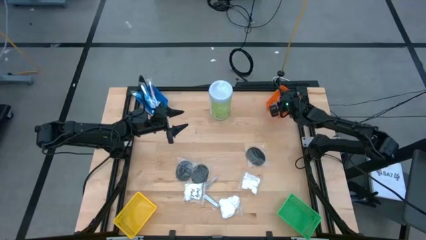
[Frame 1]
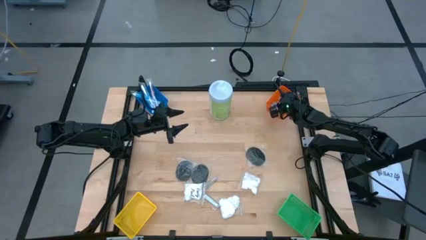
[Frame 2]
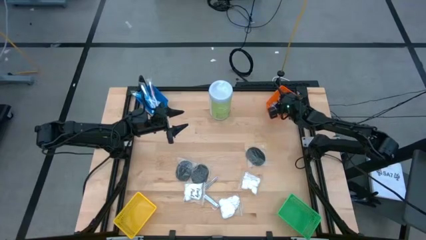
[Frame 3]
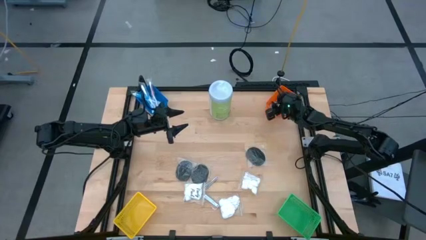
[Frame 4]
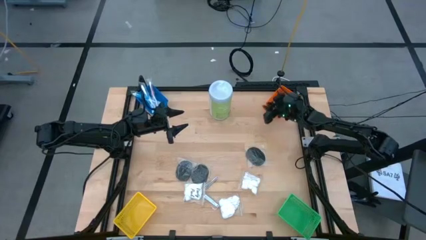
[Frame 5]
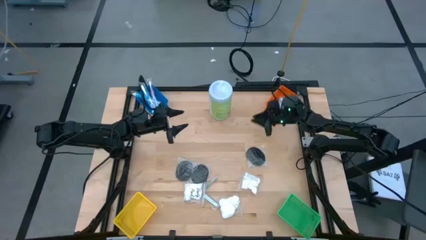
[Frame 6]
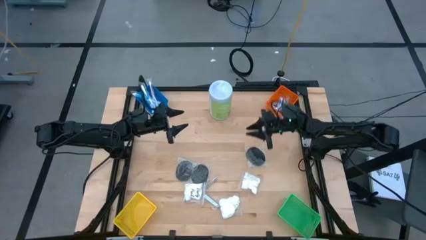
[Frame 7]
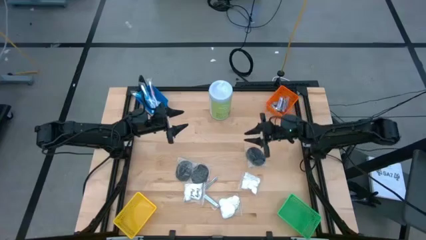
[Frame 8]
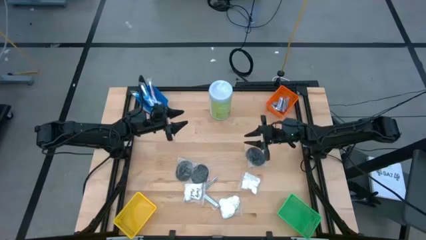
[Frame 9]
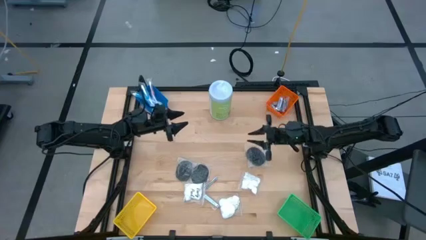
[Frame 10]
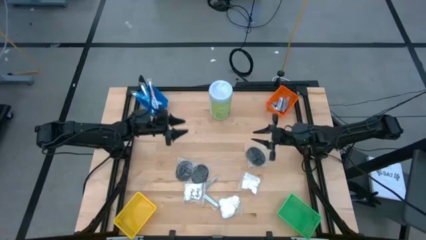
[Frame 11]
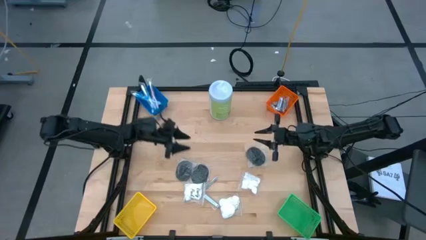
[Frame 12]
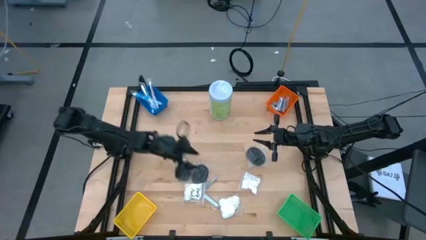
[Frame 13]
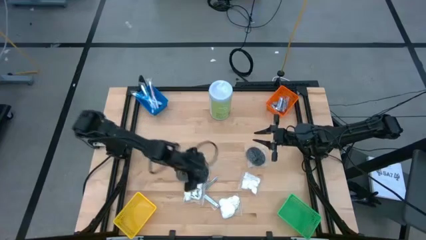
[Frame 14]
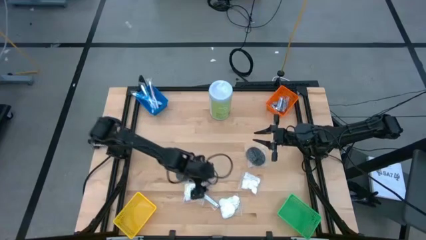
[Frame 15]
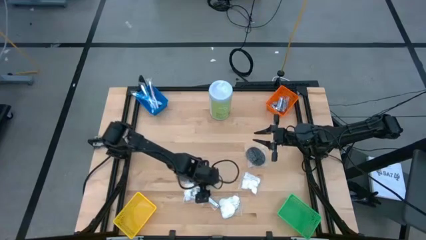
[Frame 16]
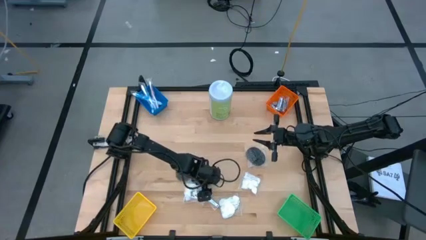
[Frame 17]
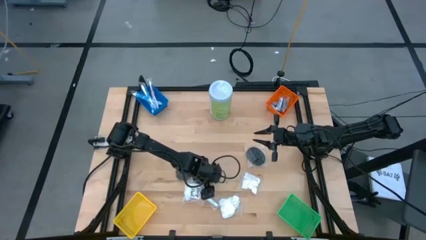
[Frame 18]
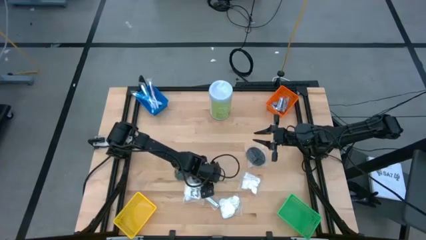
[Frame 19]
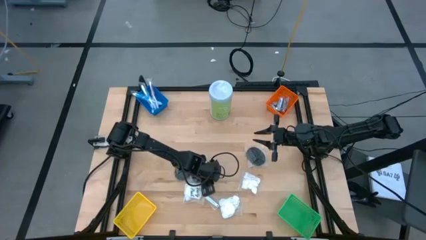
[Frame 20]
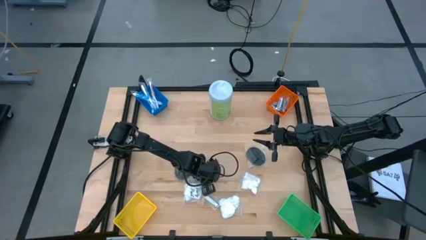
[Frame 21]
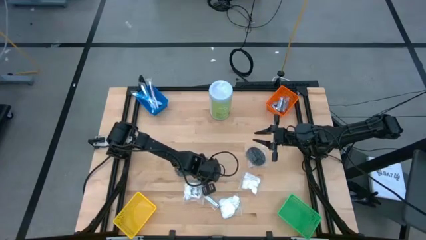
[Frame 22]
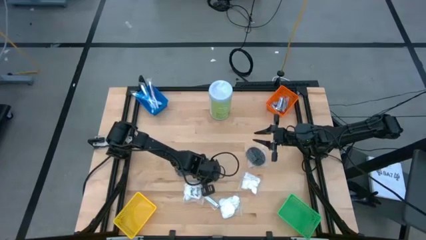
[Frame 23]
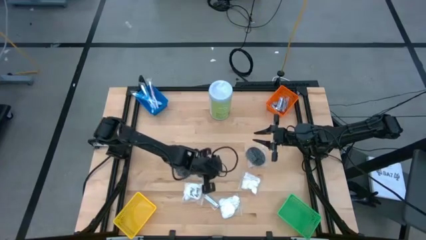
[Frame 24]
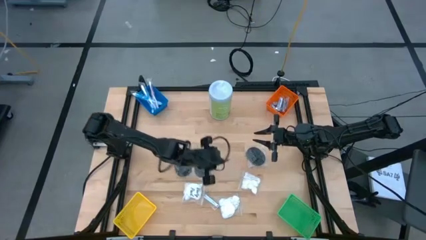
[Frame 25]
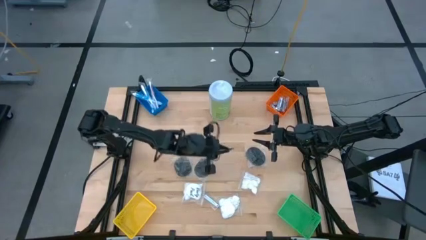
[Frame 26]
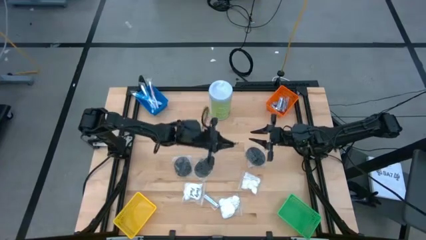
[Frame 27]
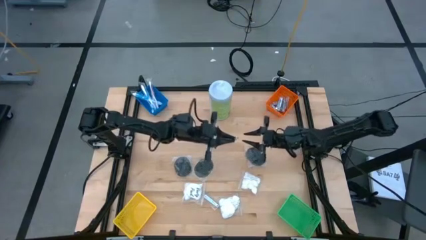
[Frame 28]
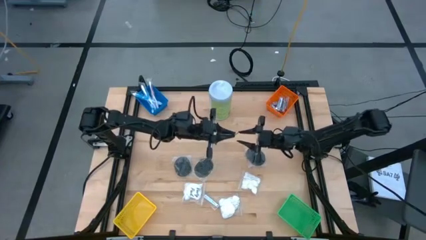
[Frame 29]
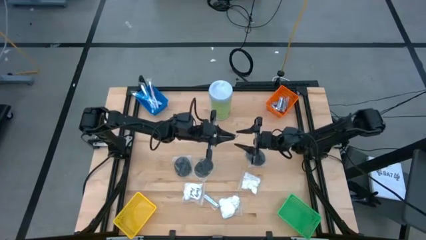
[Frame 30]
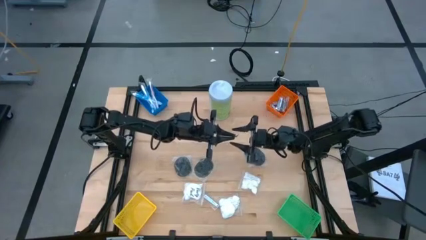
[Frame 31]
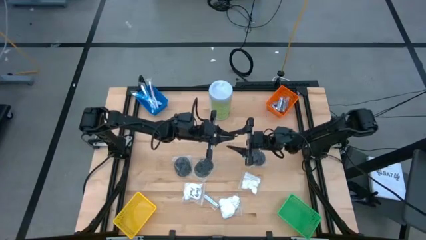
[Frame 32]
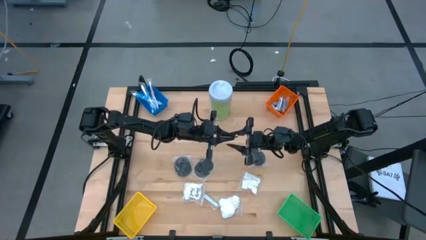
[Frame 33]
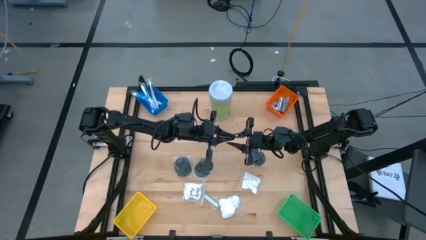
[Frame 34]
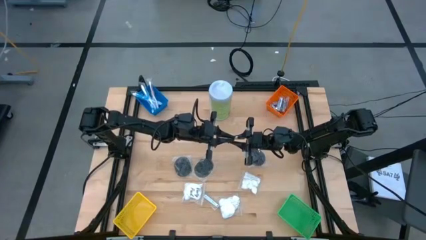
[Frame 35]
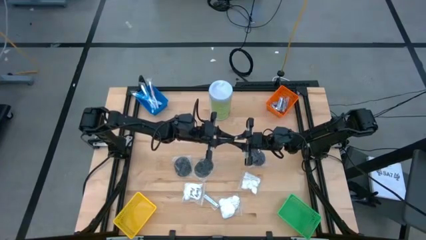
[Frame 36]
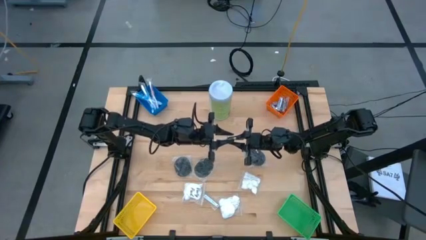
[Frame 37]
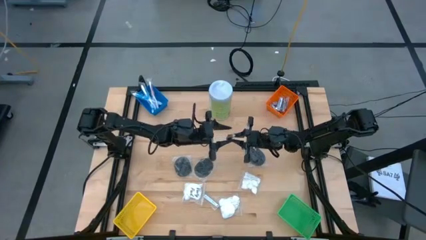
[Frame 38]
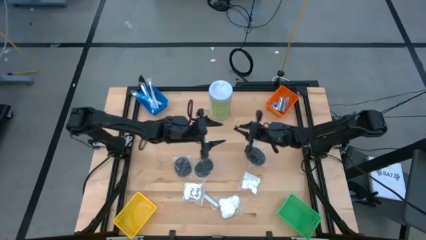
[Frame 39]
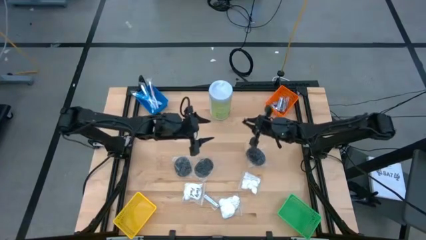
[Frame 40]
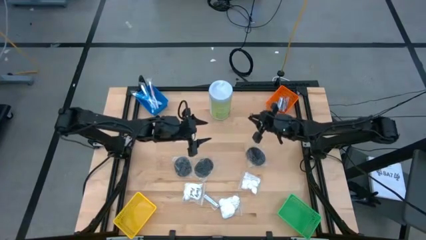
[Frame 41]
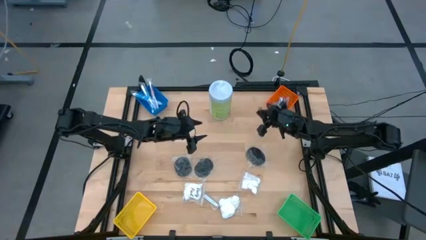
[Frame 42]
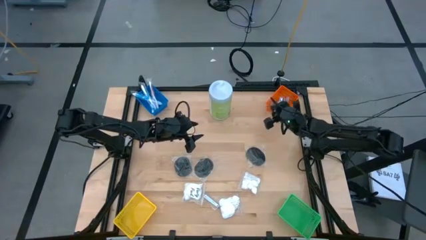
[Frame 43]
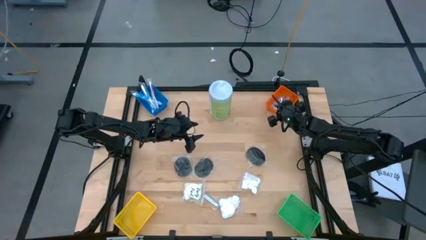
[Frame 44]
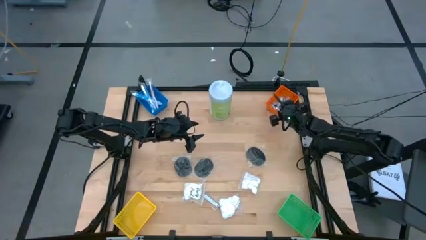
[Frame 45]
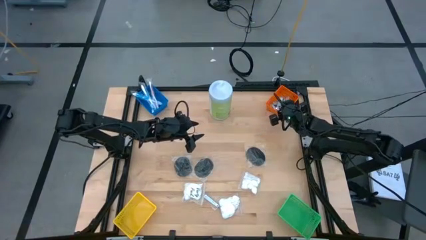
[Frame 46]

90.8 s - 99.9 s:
Task: Pick & Place Travel size toiletries
Put the nail cutter into the orange bin

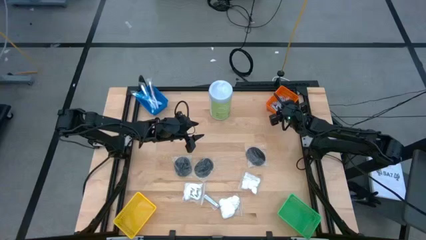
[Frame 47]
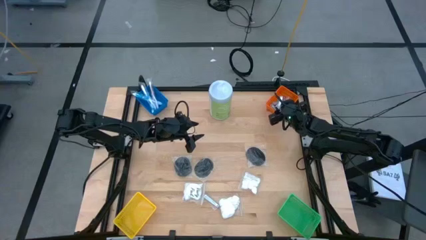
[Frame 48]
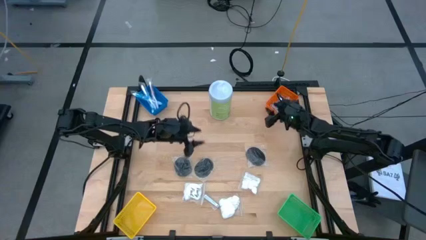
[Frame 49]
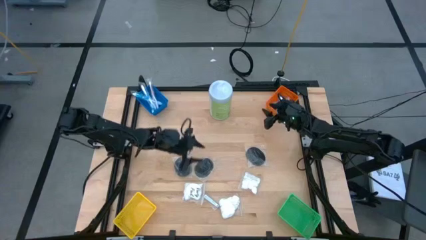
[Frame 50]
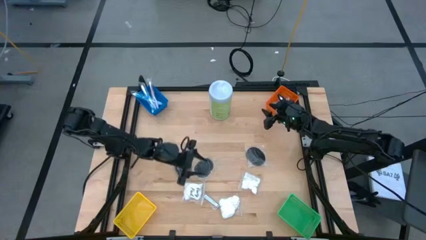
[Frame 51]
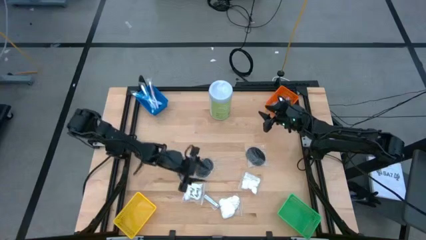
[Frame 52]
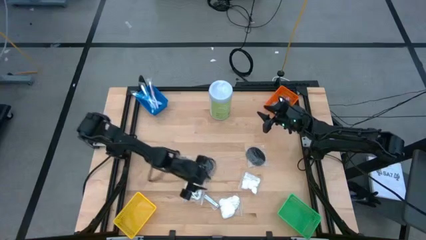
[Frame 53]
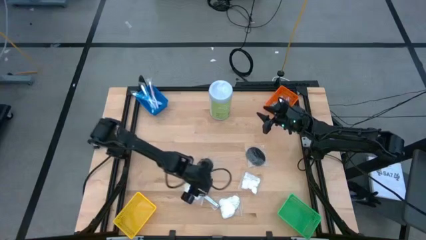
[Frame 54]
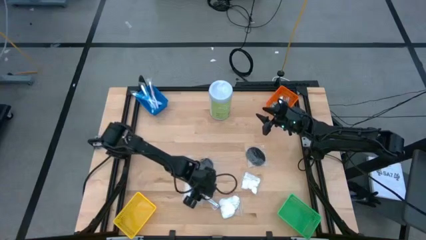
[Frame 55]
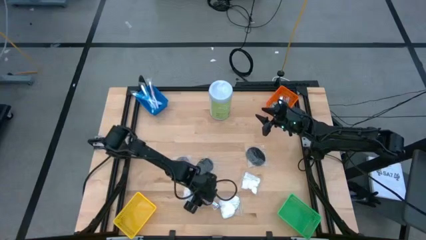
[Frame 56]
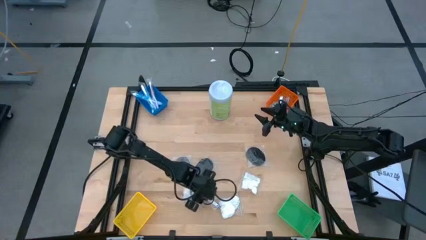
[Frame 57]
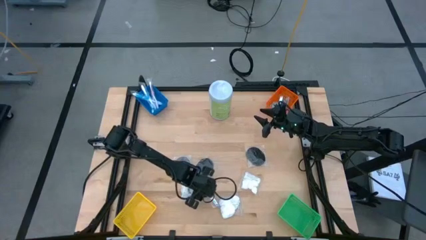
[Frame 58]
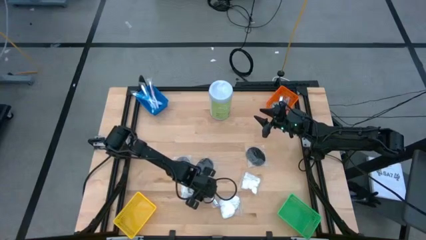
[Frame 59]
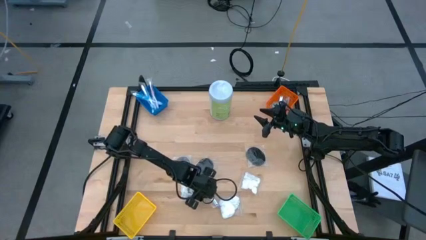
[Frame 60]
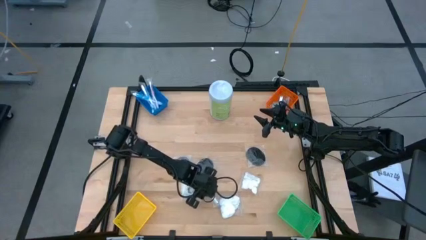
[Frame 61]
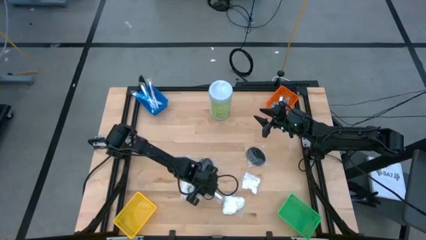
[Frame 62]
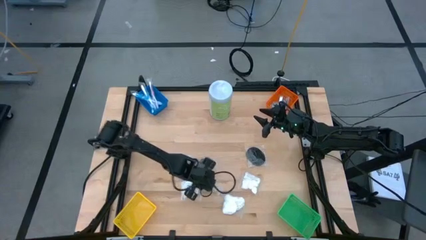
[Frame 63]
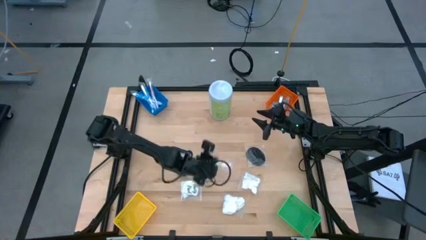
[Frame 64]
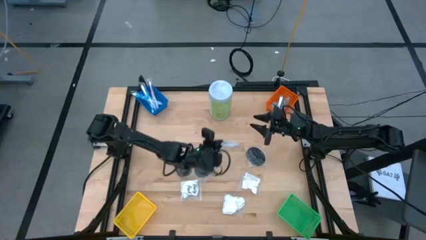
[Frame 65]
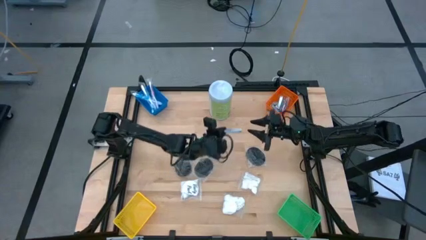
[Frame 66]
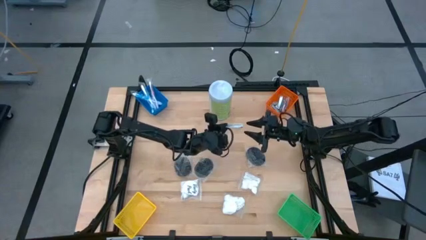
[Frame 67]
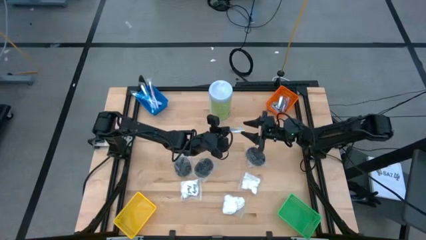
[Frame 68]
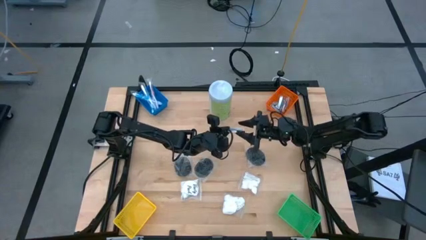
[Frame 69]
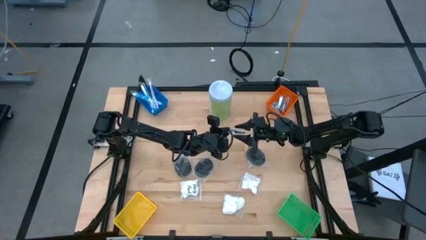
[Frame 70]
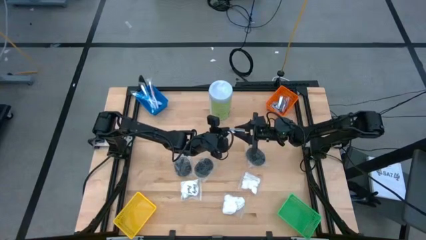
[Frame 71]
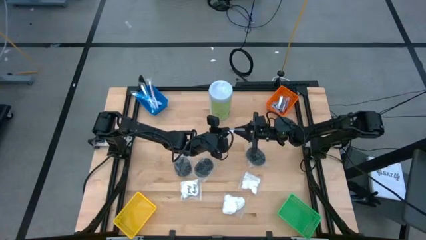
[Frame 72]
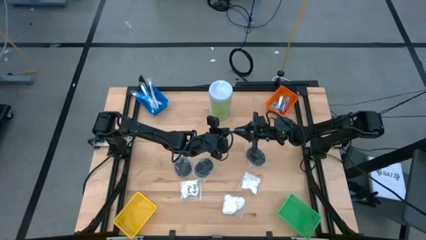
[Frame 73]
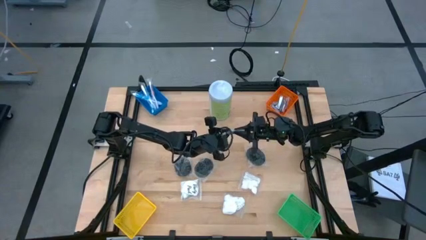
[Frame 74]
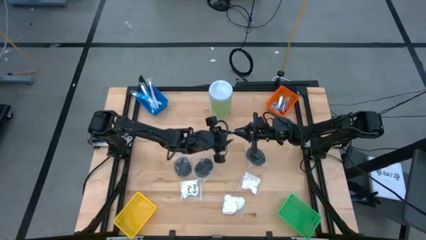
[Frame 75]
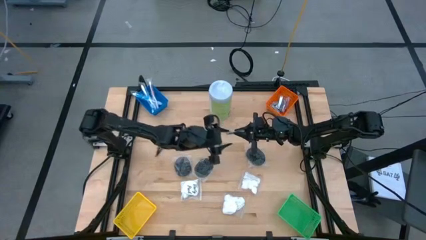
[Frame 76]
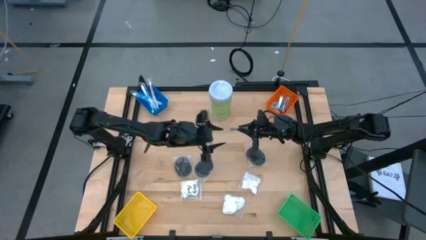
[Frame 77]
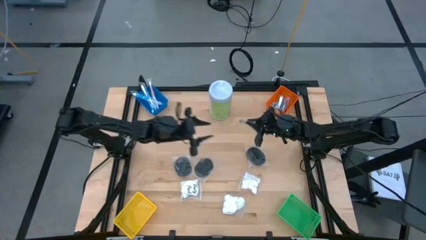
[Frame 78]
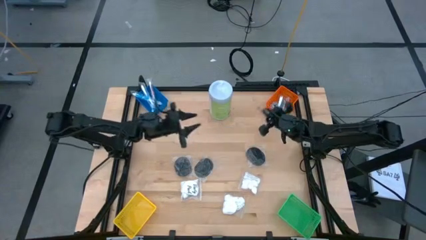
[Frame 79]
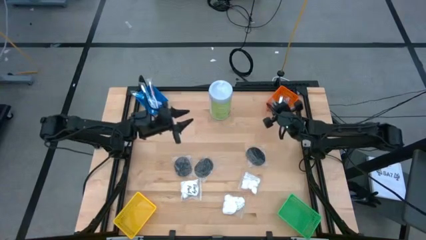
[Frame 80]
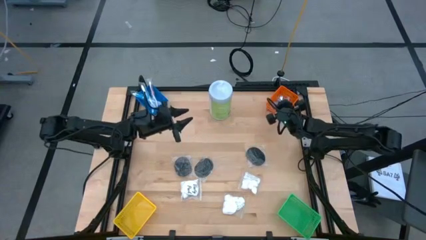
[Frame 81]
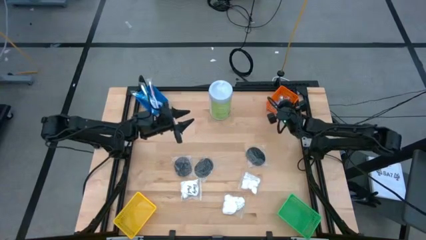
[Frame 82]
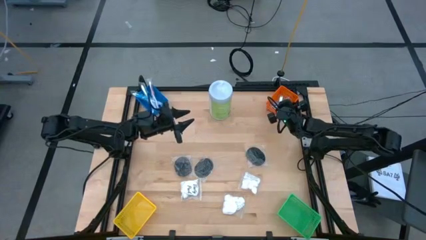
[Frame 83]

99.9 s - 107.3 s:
Put the nail cutter into the orange bin

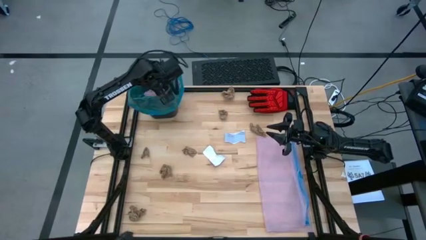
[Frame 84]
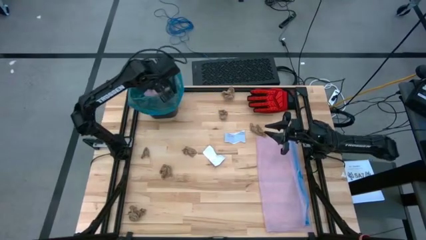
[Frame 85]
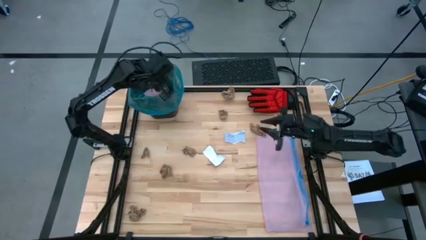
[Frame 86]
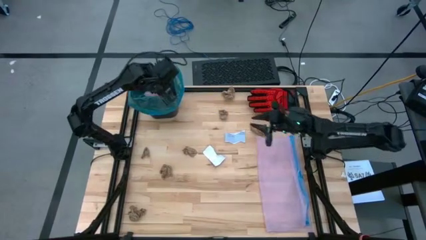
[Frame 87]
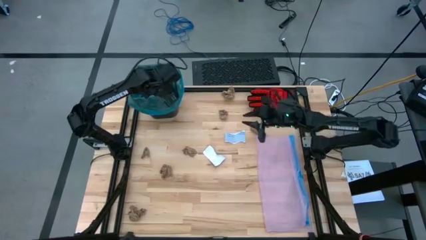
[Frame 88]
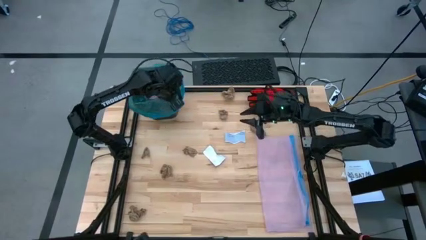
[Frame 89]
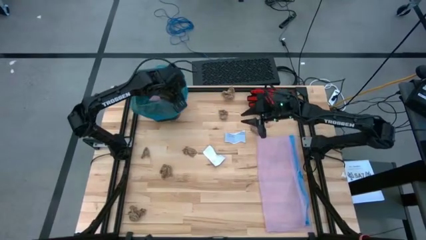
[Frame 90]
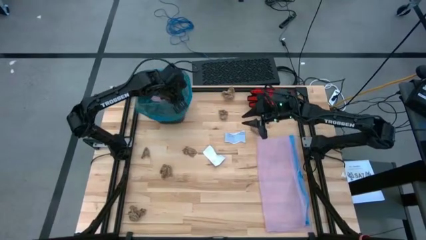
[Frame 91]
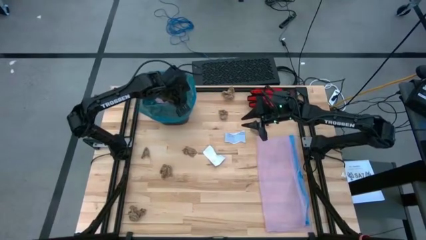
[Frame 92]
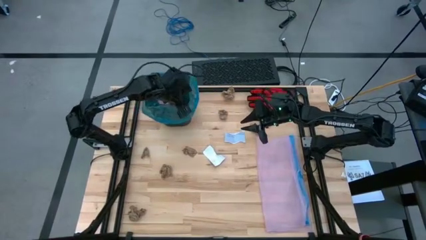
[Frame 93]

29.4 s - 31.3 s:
Task: place trash/remove bag and relplace
Adjust the trash bin
